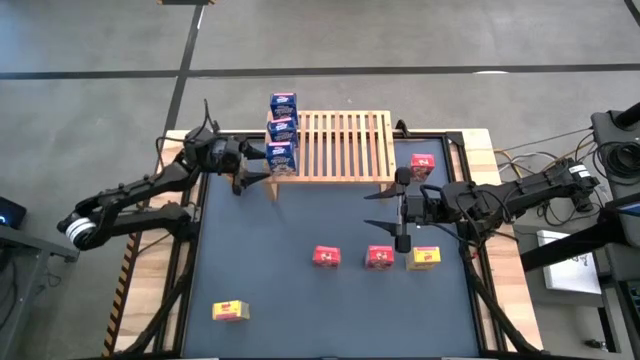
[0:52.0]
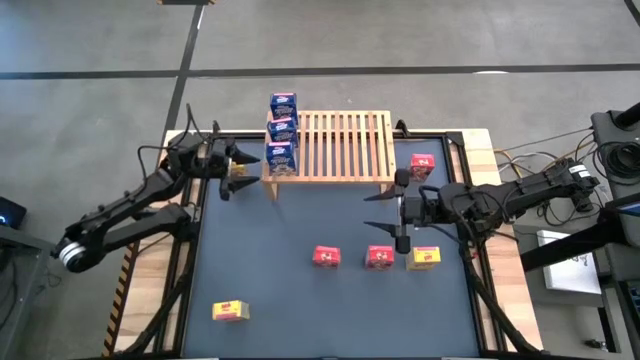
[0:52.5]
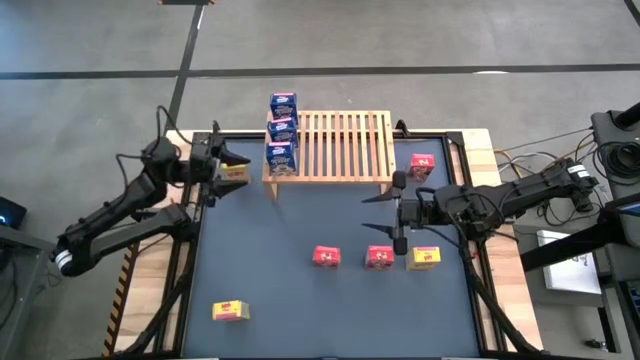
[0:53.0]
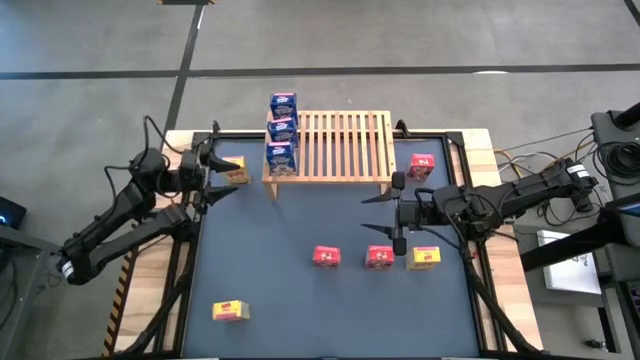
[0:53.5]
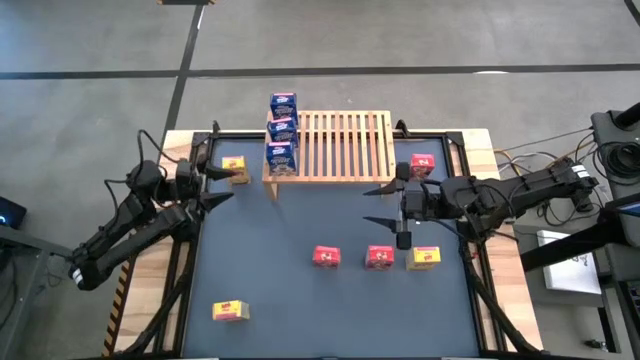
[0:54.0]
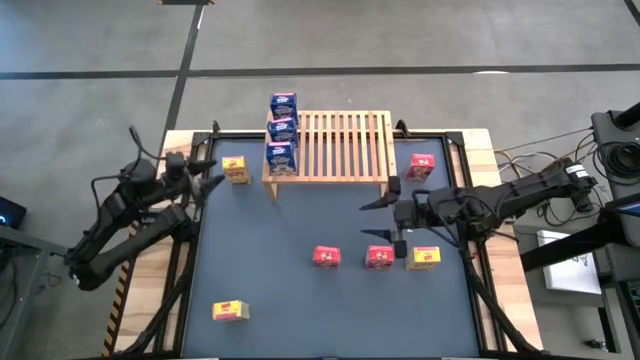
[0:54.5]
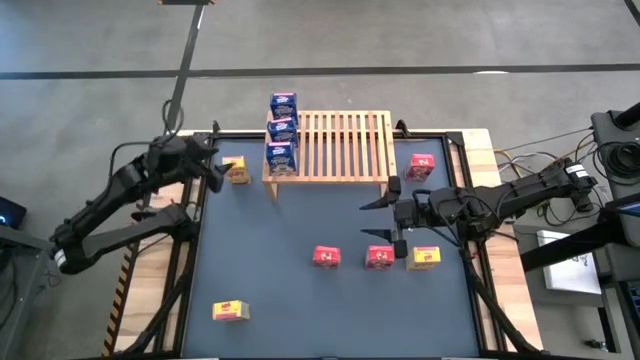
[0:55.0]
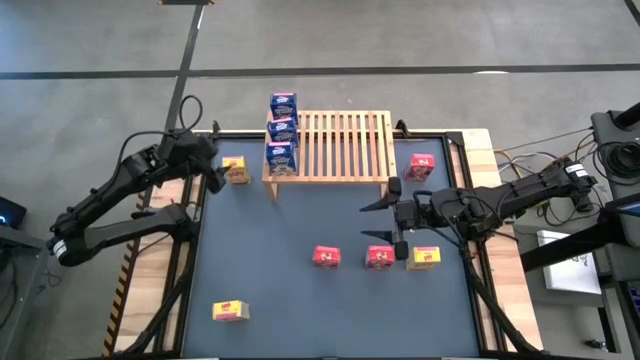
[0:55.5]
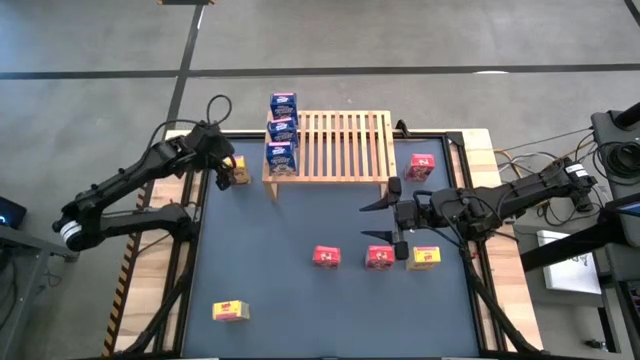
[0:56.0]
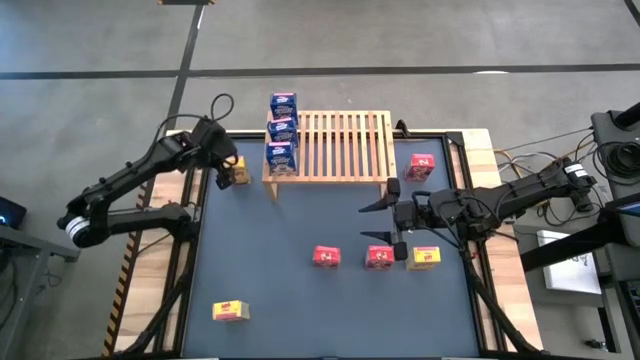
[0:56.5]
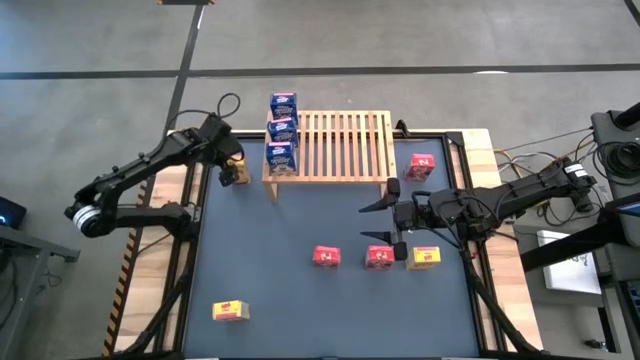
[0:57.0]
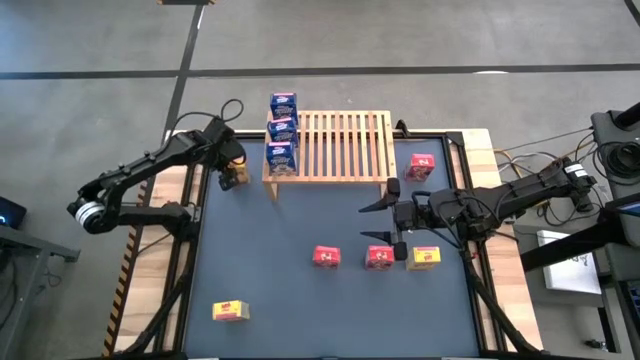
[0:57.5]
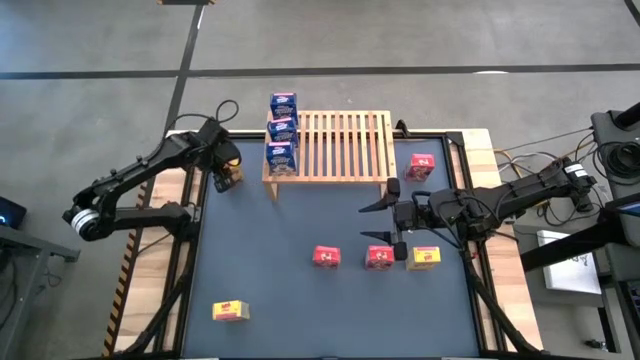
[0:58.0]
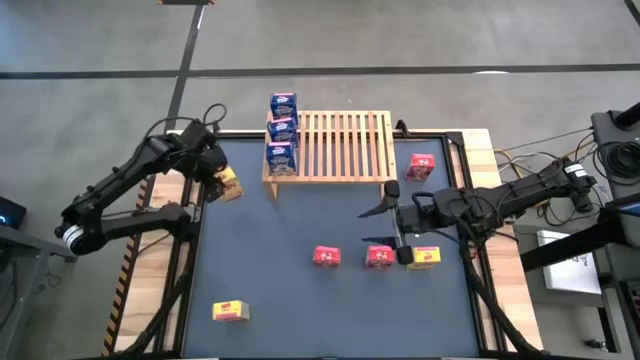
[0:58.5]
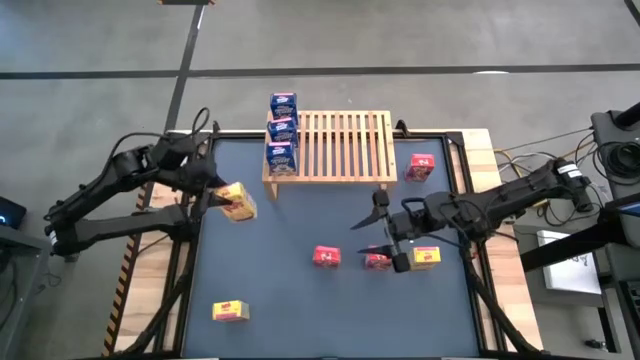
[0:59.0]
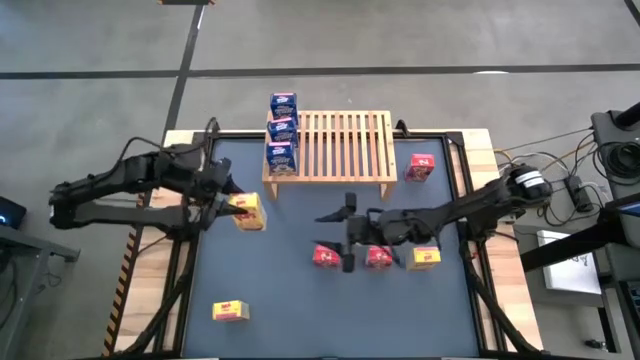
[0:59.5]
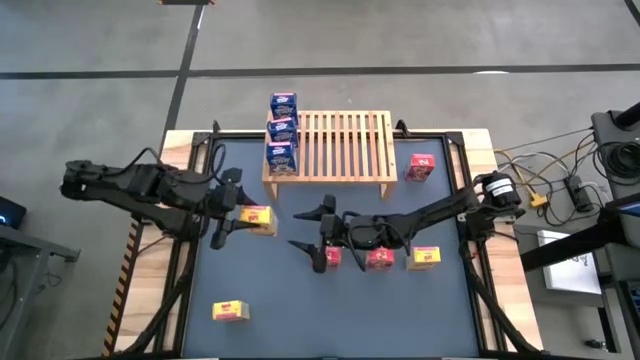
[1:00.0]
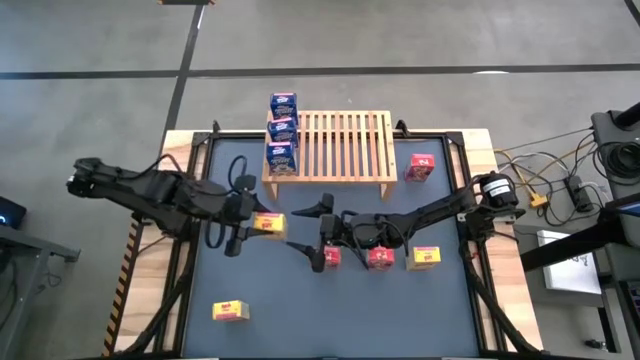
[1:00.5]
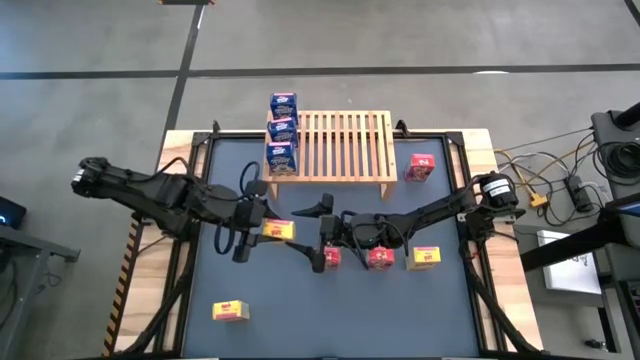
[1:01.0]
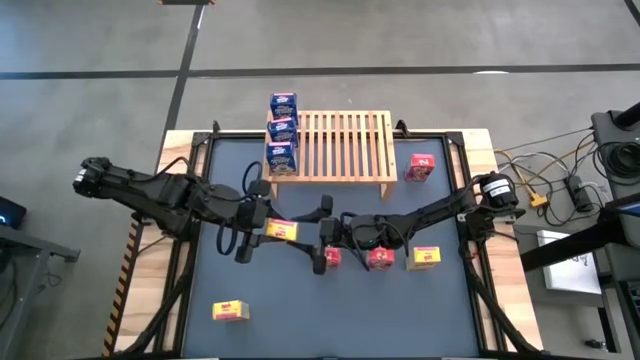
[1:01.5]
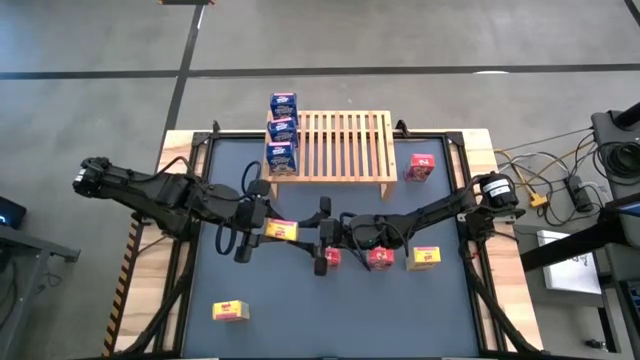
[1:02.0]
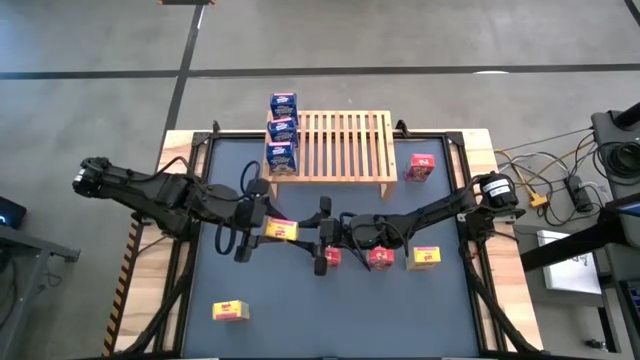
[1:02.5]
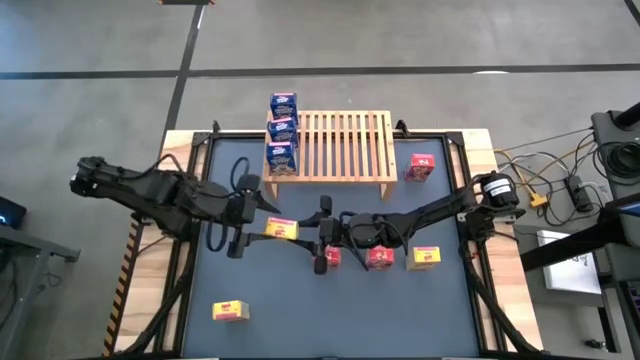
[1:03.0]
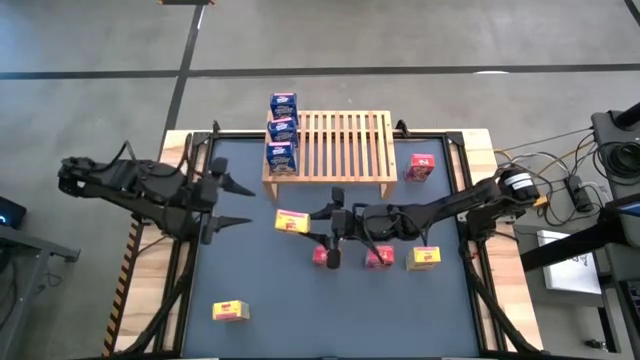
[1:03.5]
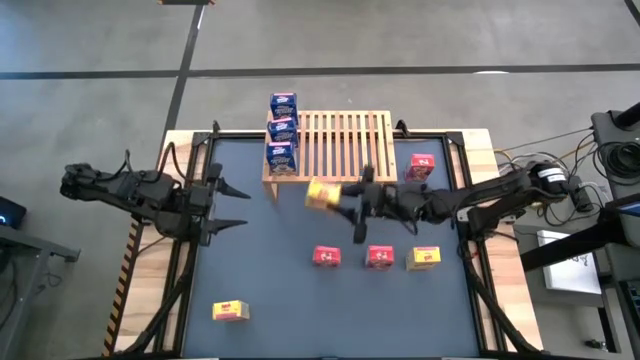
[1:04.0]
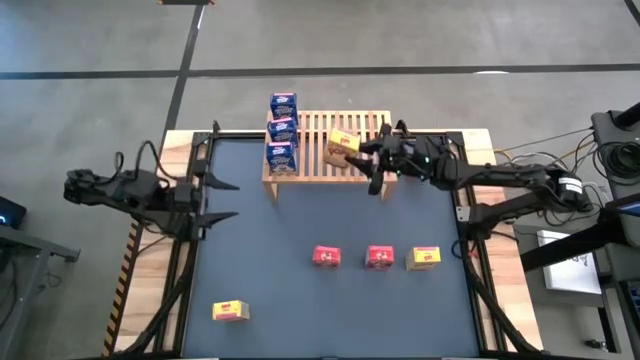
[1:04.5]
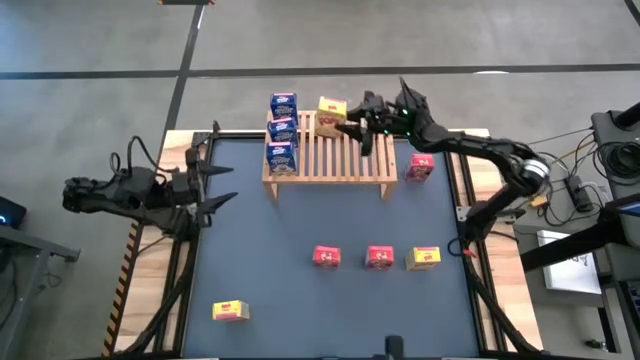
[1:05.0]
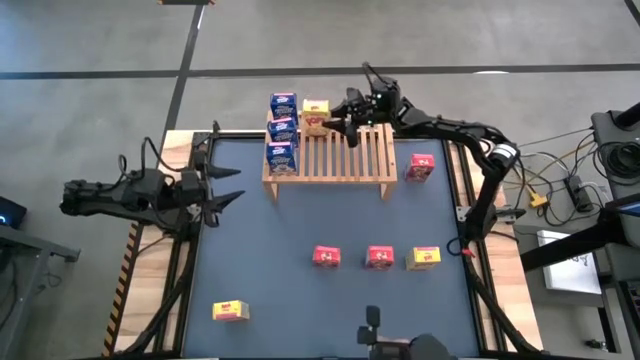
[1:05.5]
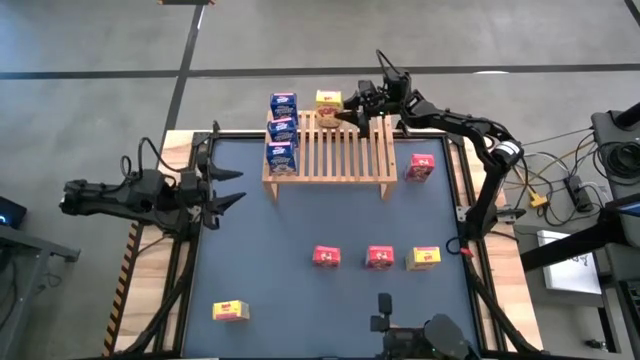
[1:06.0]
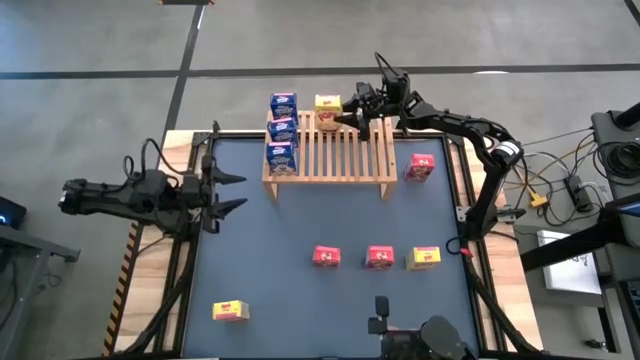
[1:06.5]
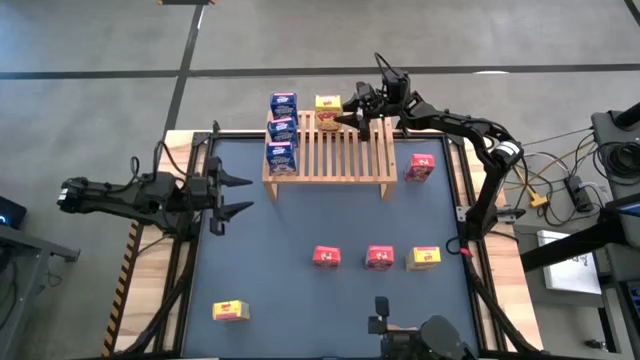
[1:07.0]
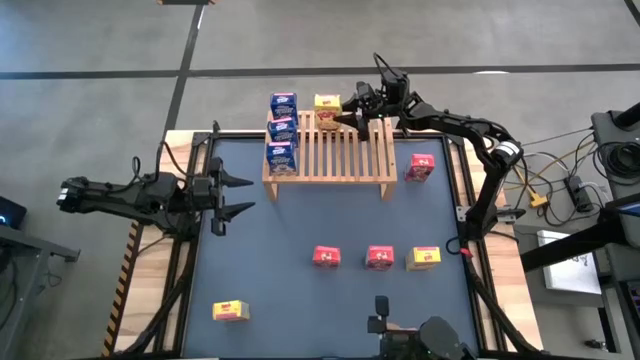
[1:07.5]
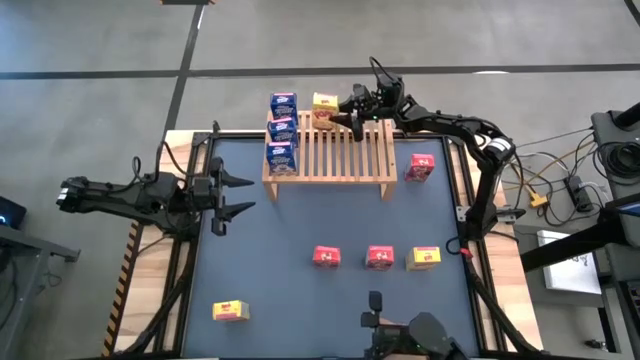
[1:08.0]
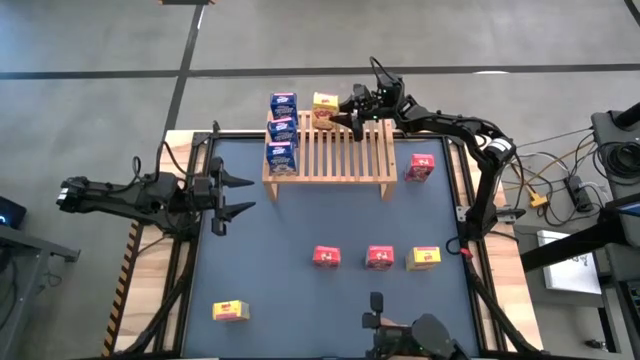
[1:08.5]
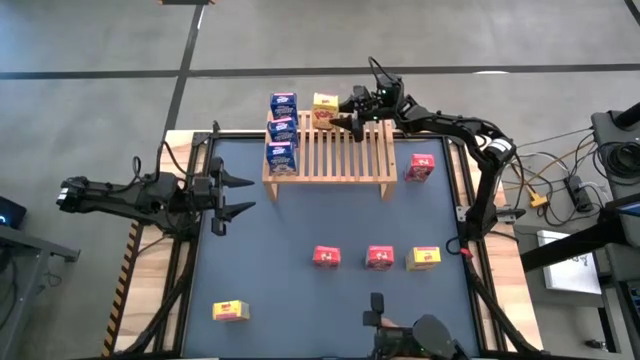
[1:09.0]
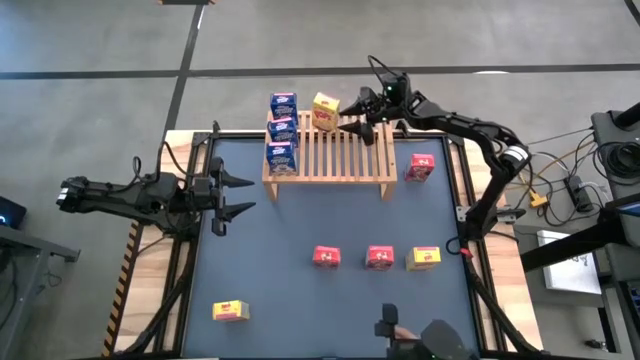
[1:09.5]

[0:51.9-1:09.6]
Task: Stack cereal on shelf
Put the top yellow cereal box on the shelf

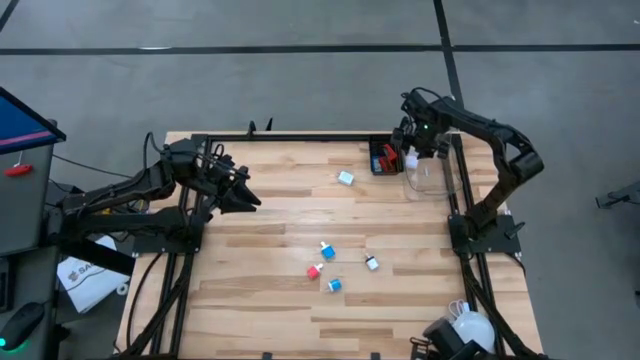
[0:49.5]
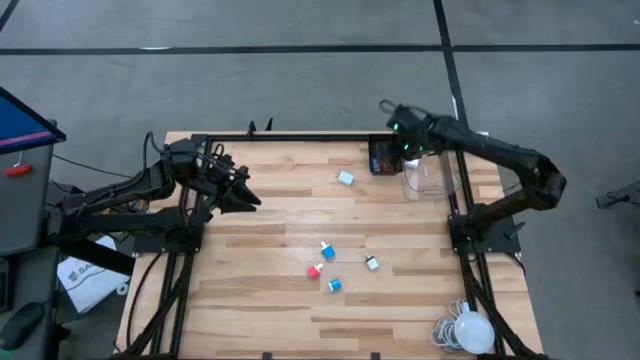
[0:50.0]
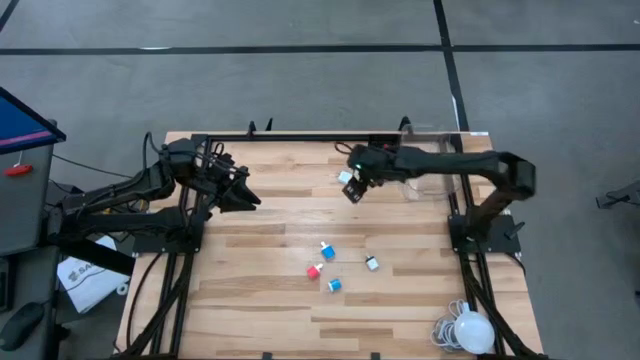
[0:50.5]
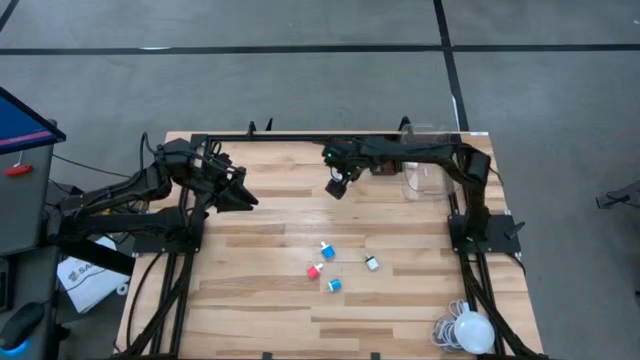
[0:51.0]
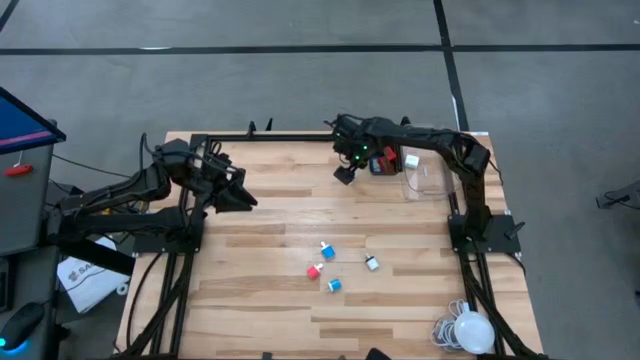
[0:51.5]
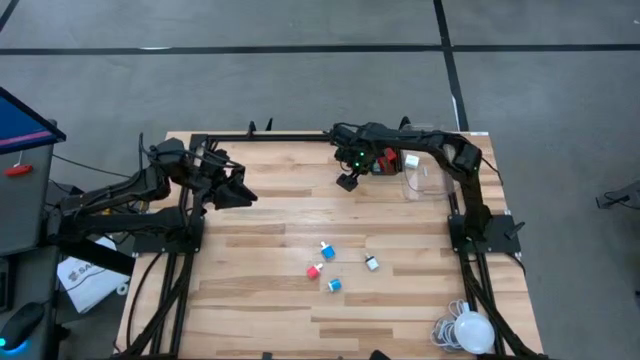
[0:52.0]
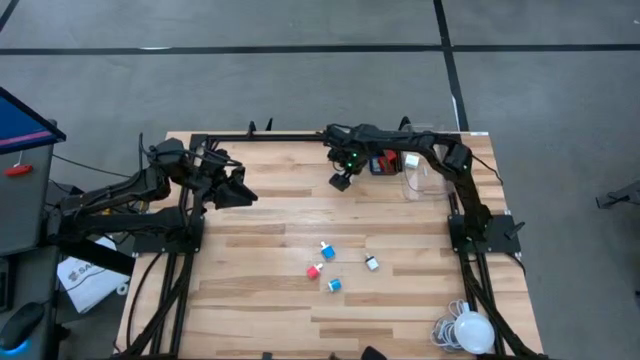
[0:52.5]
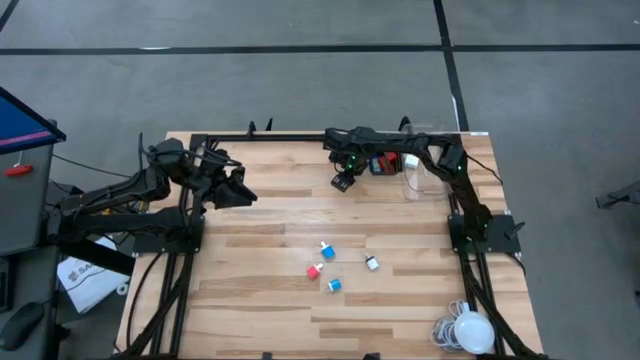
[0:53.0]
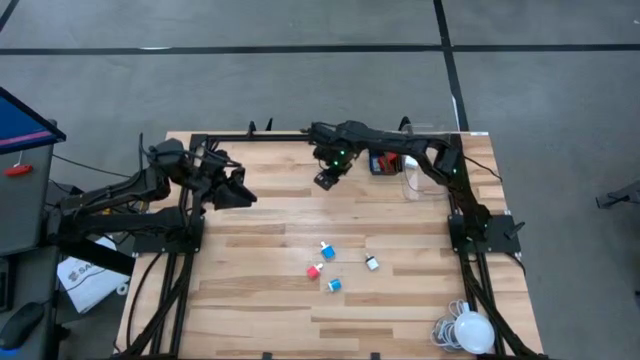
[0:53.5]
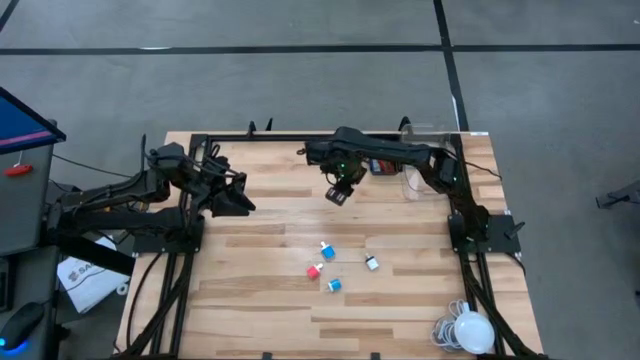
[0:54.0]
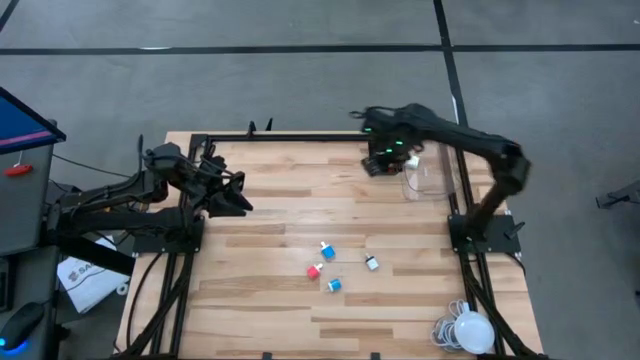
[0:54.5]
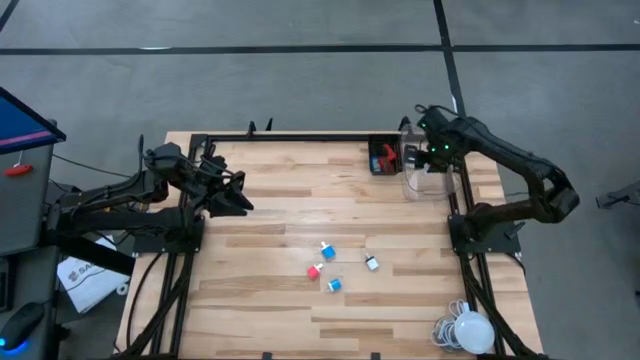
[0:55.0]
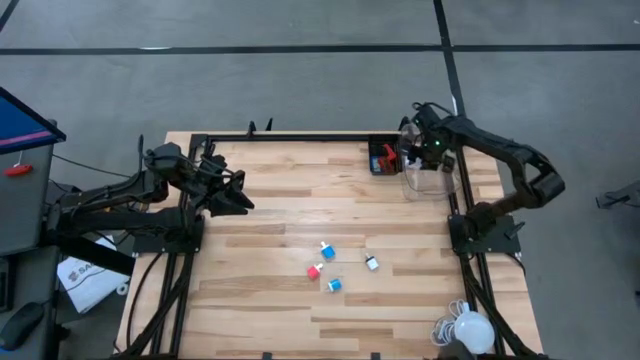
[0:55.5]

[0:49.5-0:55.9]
Task: Pick & Place Office items
Put the white charger adapter into the transparent bin
